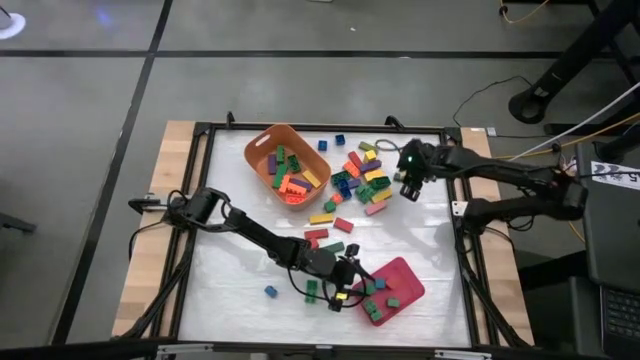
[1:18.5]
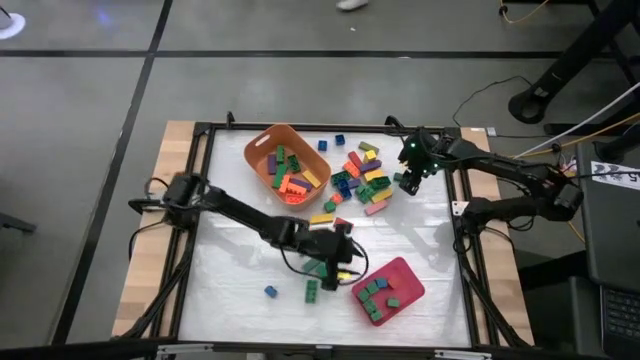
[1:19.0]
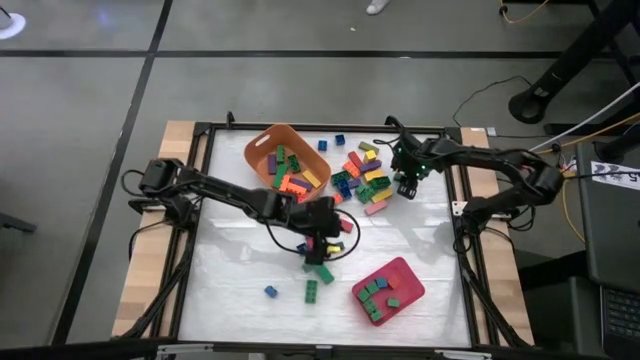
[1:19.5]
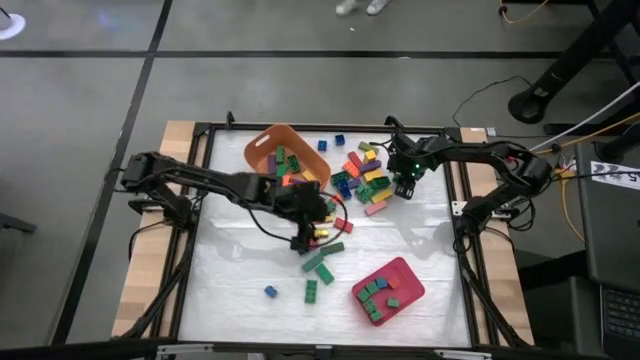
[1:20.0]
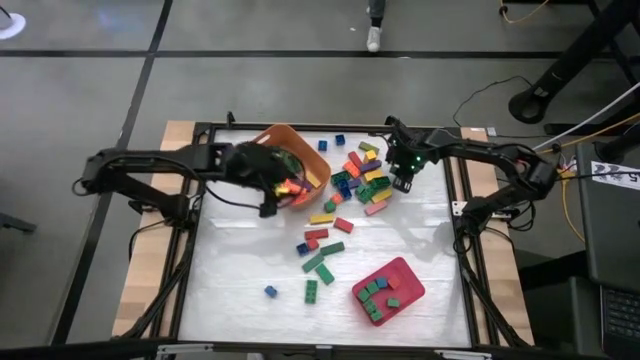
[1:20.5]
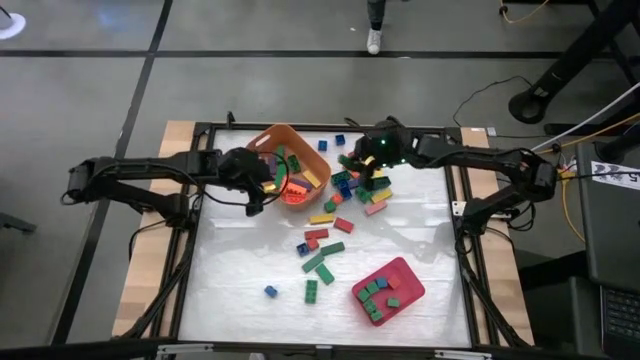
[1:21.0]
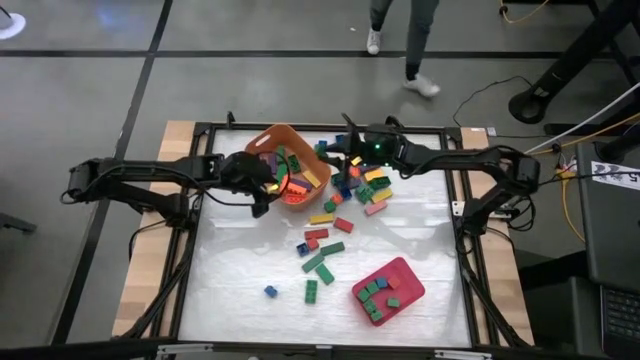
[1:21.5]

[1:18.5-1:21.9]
Task: Sort blocks by size
Put the large green block into the orange bin

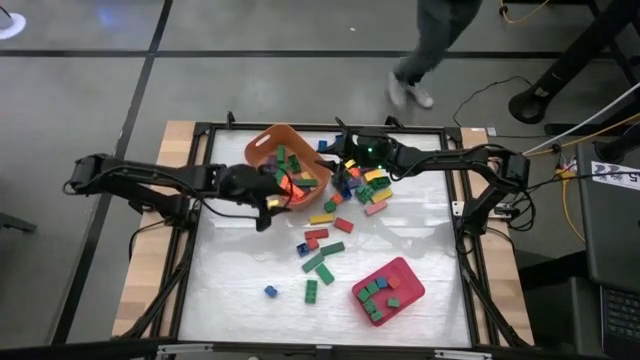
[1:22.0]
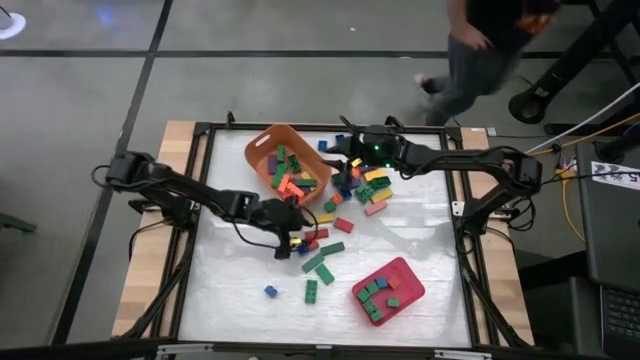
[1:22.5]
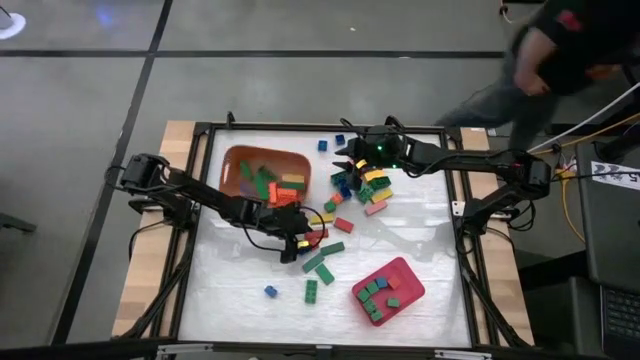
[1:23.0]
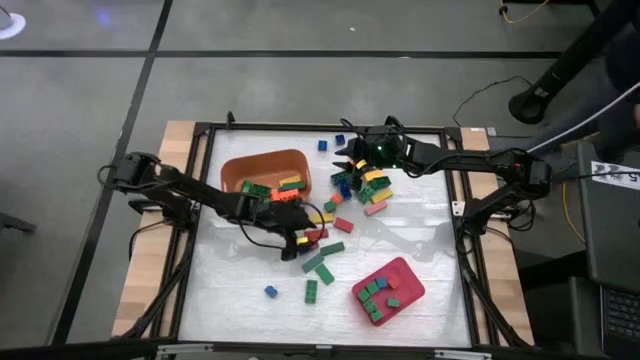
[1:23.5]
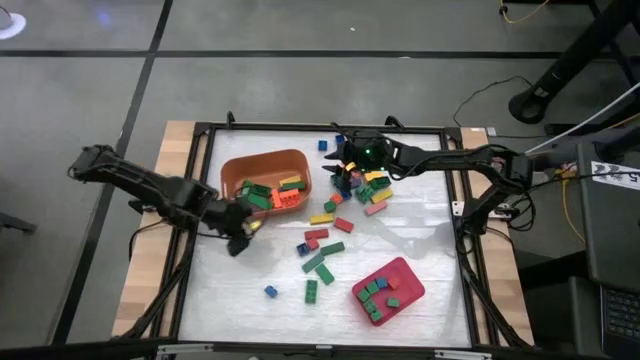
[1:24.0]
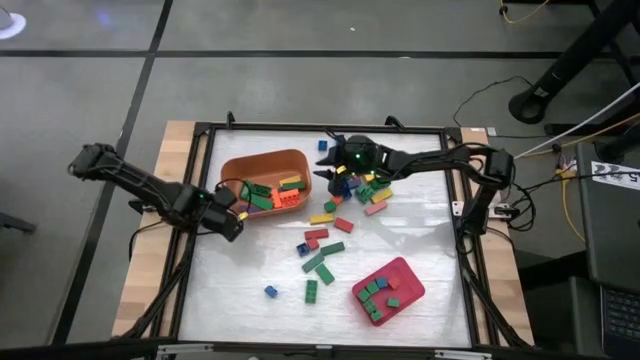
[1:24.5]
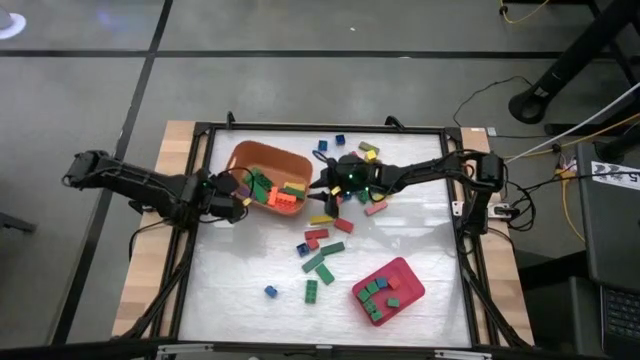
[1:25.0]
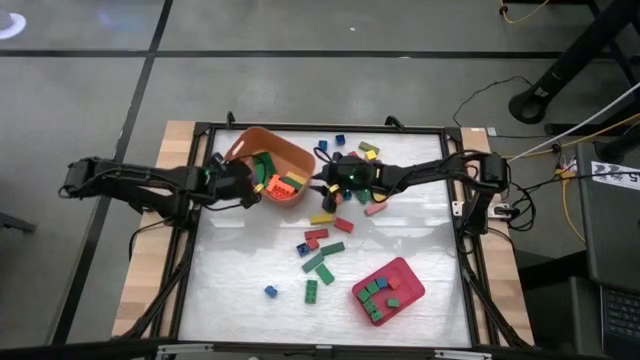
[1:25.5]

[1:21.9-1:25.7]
Adjust the orange bin

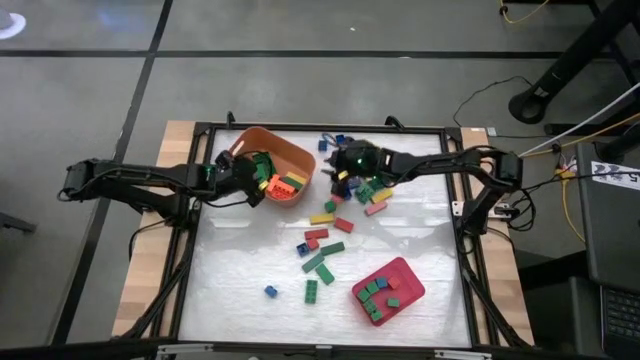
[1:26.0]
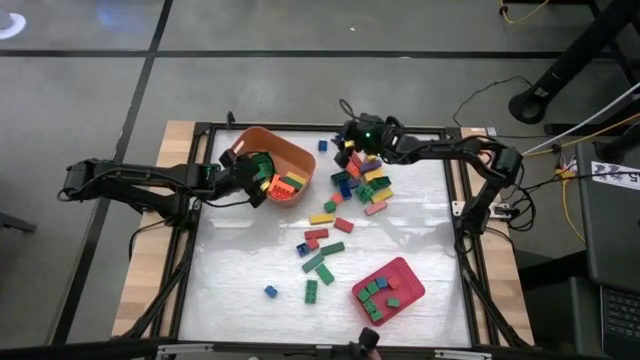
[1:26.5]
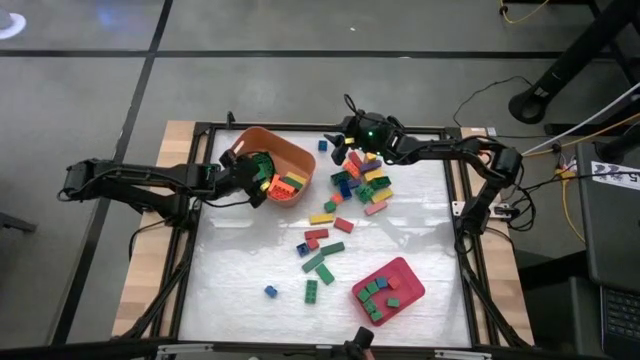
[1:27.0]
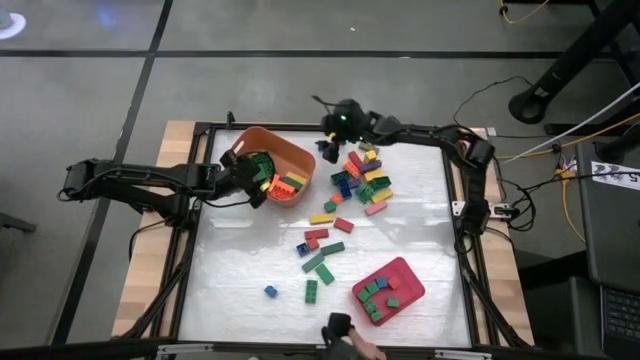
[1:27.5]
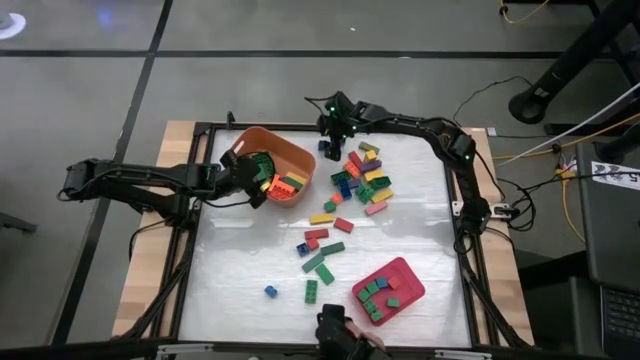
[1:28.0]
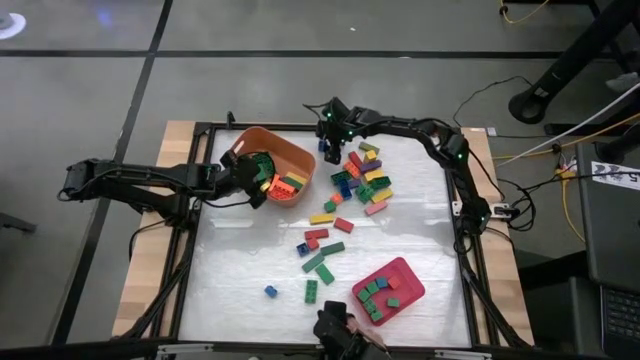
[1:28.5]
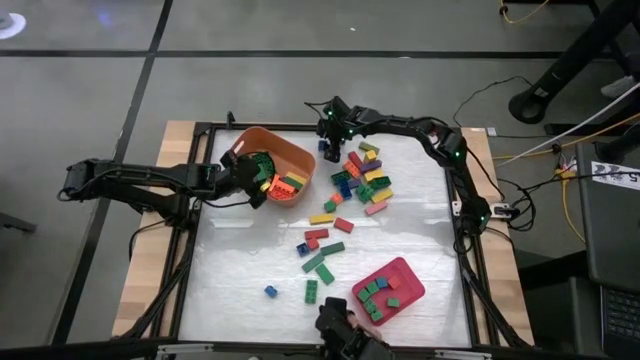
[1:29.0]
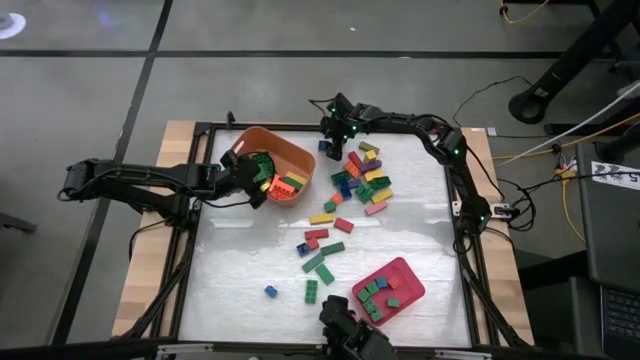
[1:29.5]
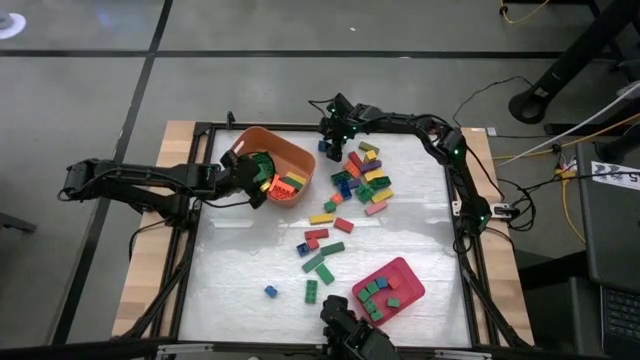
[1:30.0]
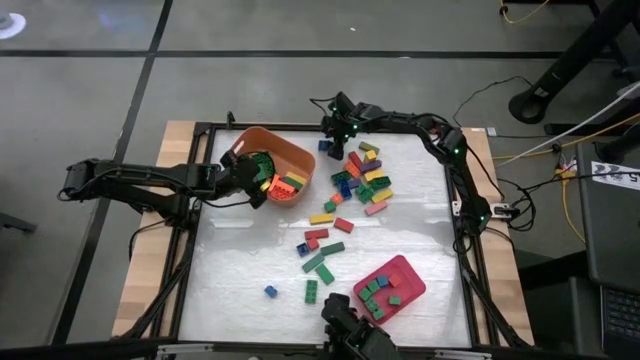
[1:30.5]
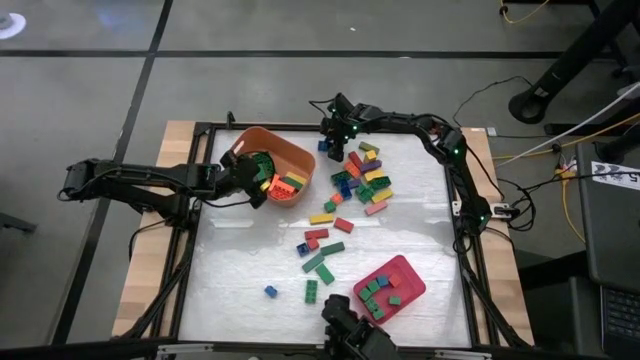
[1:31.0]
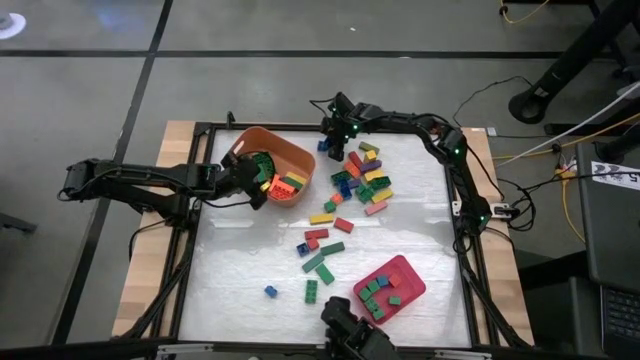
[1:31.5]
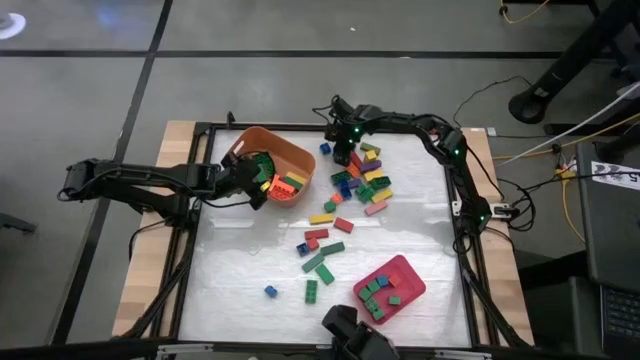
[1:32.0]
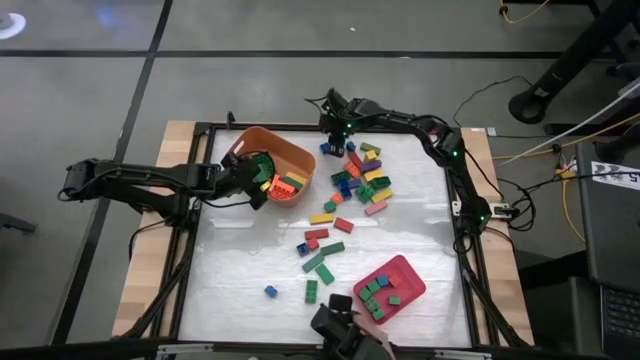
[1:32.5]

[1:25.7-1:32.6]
Put the small blue game piece into the red bin

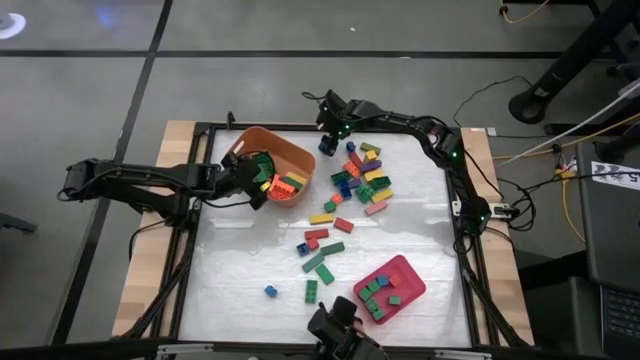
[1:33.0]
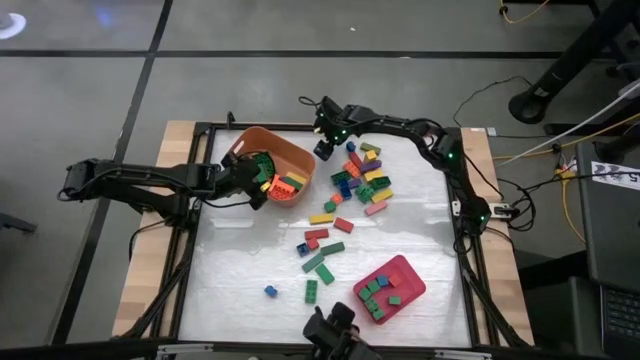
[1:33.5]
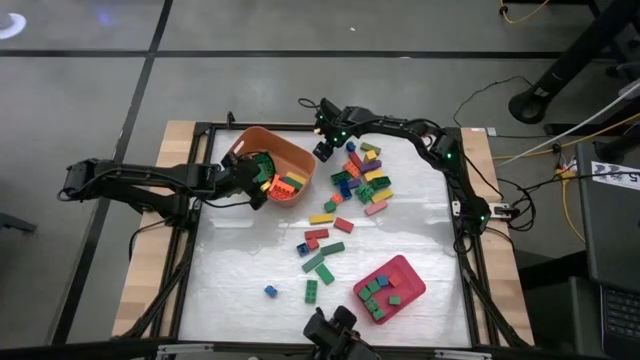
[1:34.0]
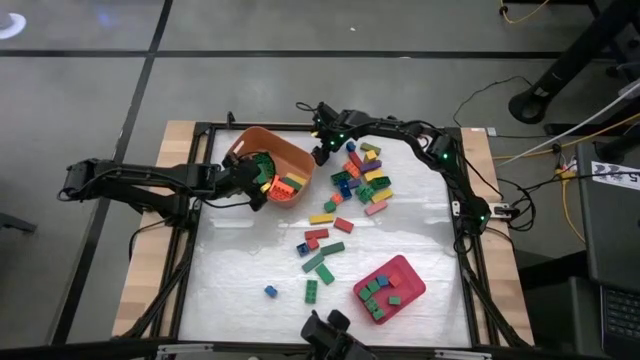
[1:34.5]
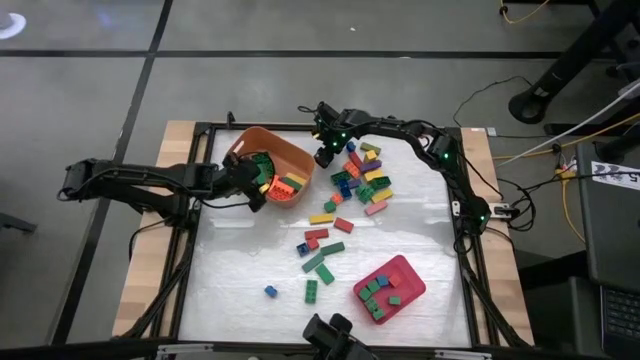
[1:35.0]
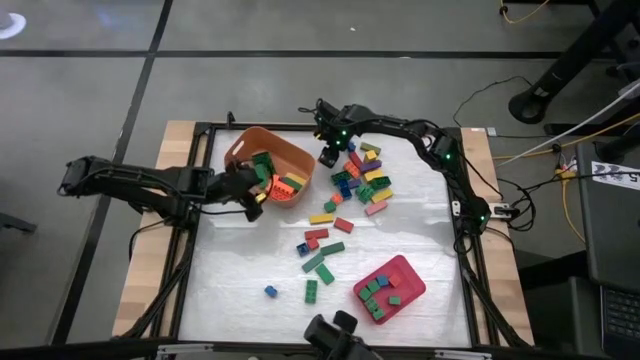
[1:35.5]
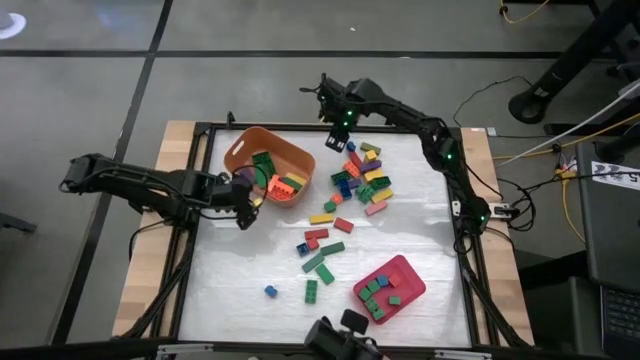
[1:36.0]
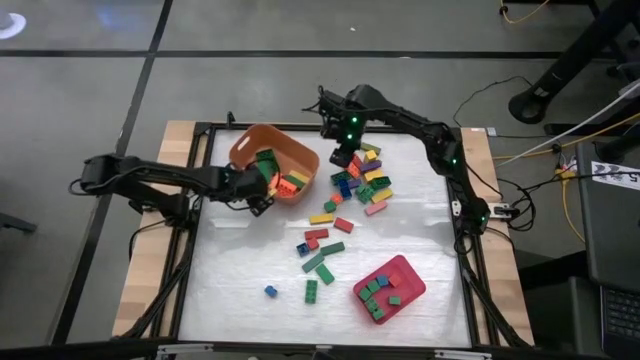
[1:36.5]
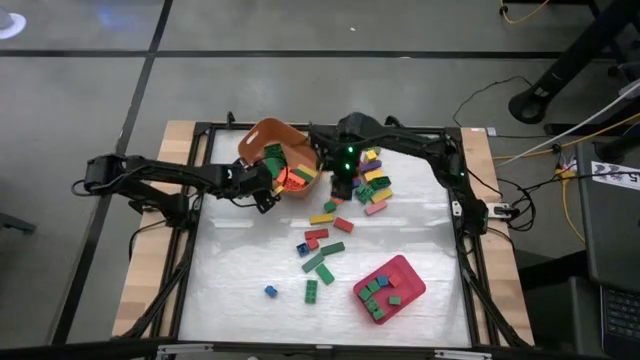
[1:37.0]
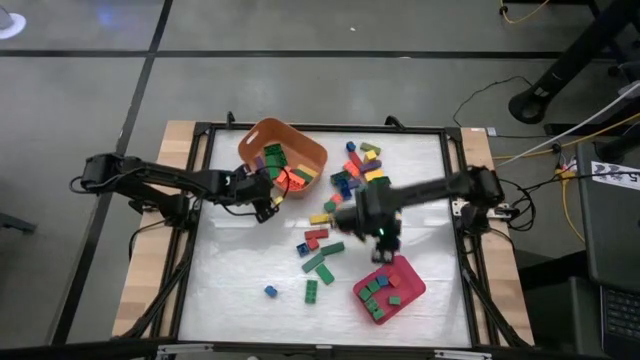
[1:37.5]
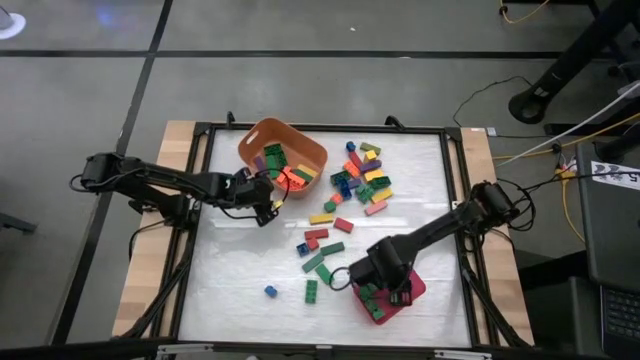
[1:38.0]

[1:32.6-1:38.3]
Put the small blue game piece into the red bin

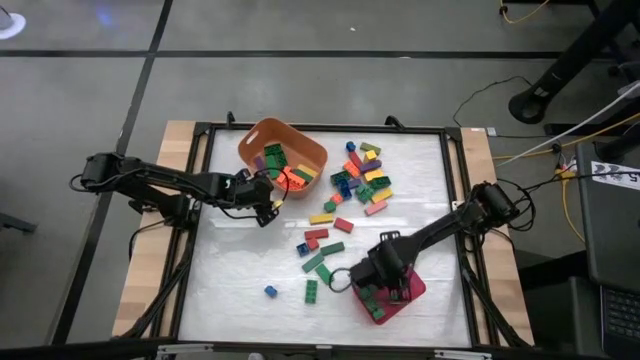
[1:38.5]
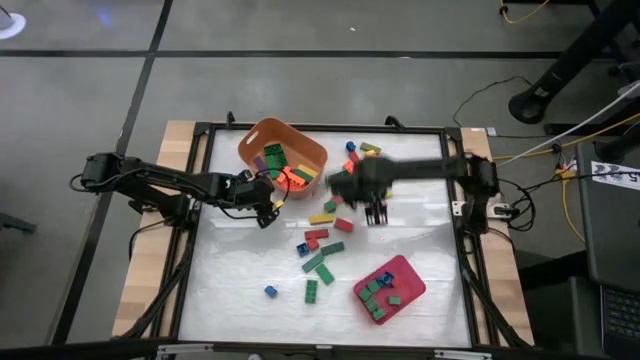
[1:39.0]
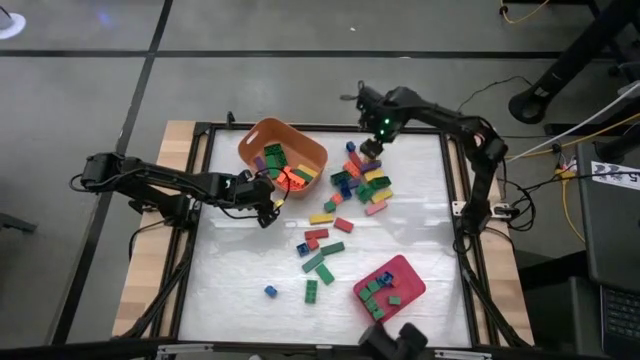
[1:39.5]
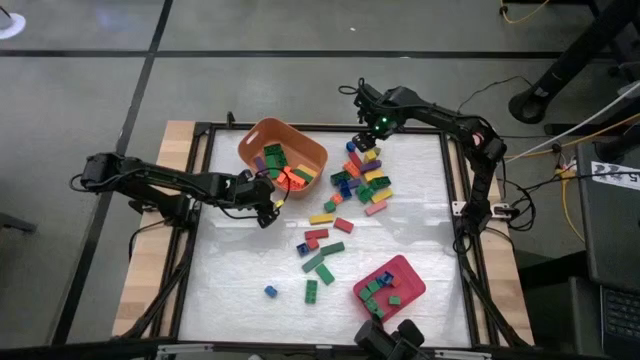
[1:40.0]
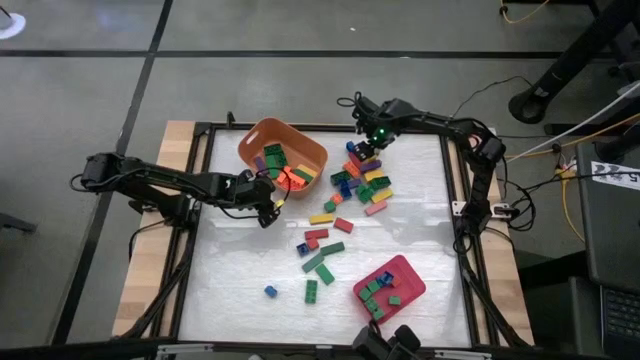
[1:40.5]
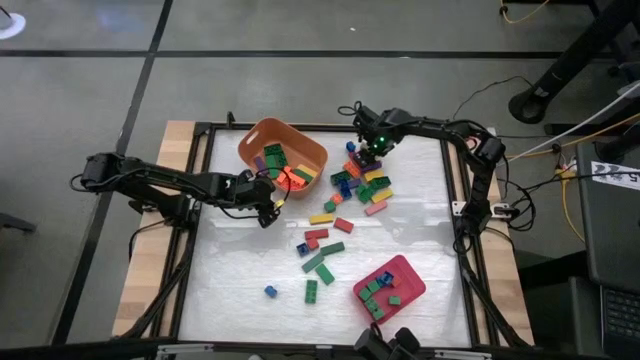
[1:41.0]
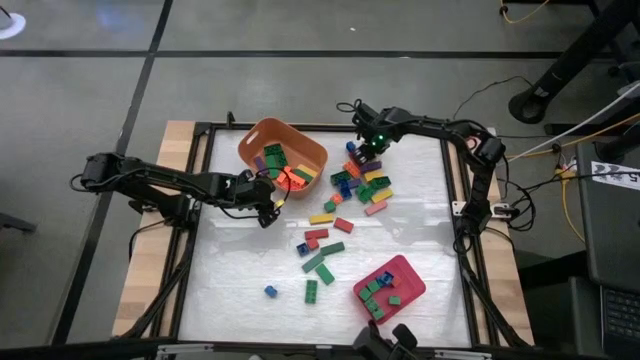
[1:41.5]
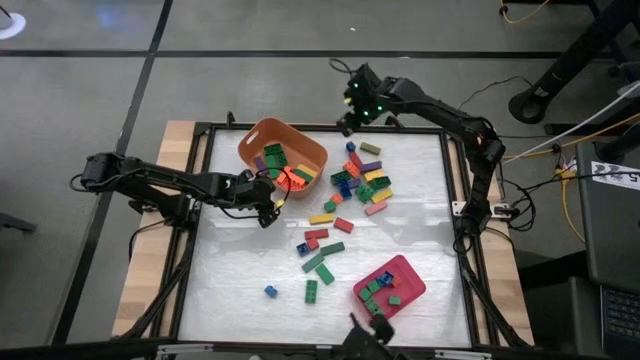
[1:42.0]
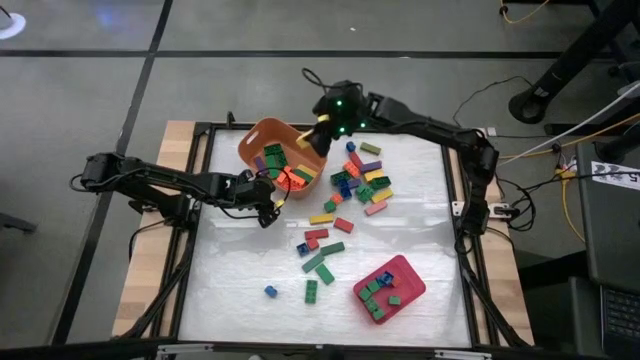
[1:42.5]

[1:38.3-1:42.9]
Put the large yellow block into the orange bin
